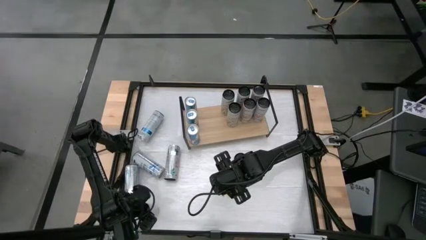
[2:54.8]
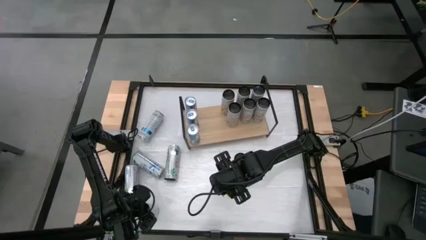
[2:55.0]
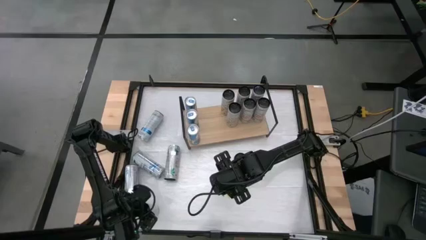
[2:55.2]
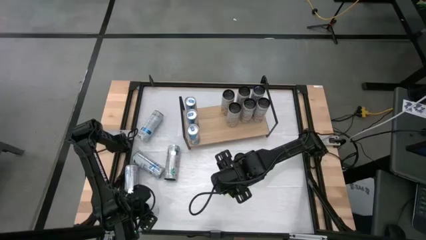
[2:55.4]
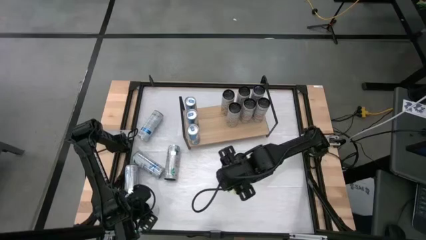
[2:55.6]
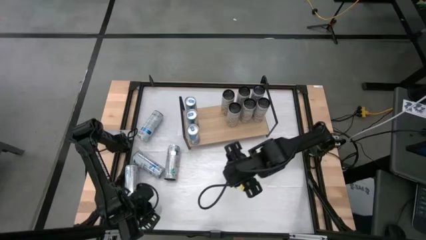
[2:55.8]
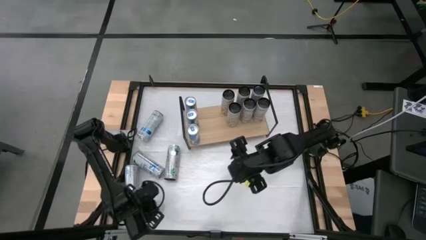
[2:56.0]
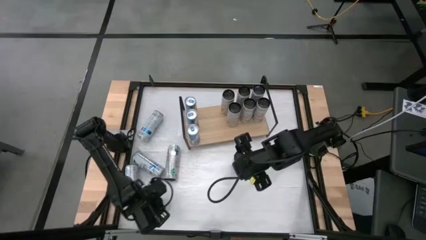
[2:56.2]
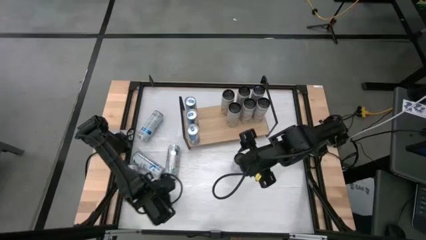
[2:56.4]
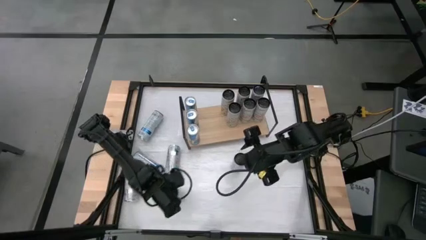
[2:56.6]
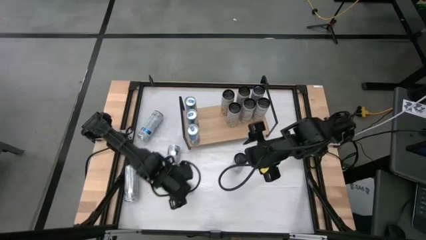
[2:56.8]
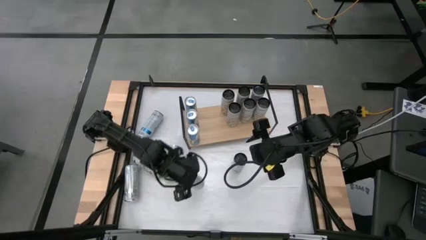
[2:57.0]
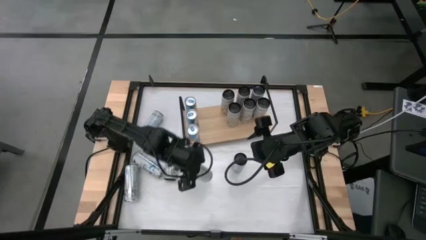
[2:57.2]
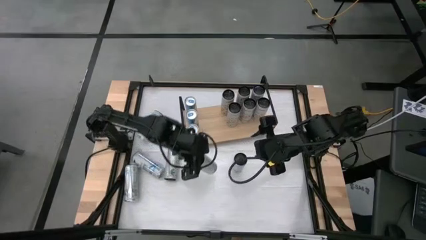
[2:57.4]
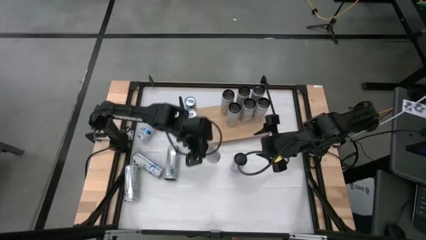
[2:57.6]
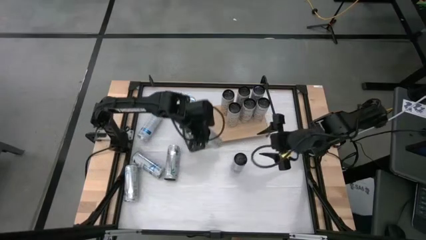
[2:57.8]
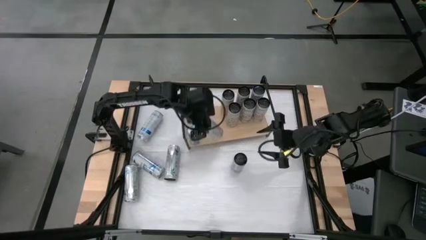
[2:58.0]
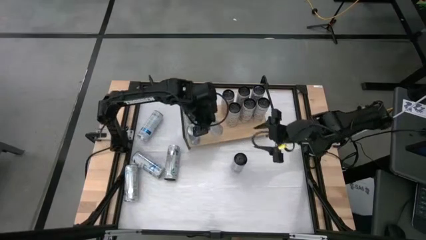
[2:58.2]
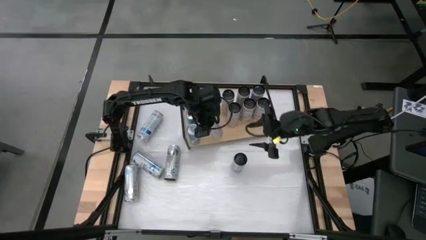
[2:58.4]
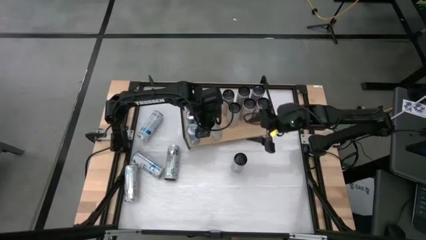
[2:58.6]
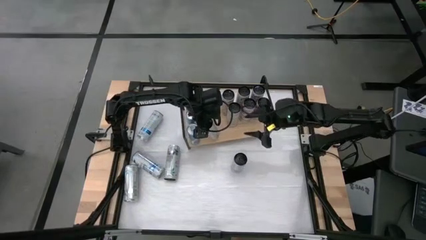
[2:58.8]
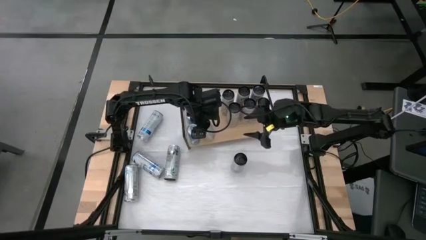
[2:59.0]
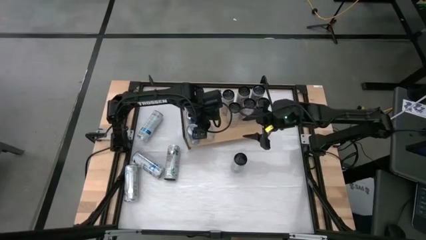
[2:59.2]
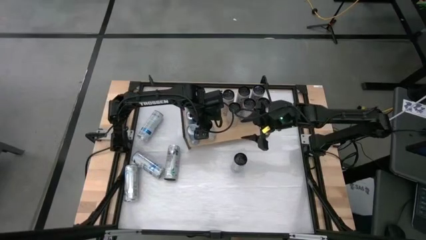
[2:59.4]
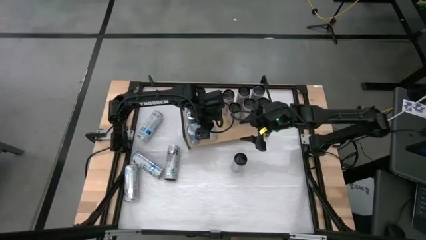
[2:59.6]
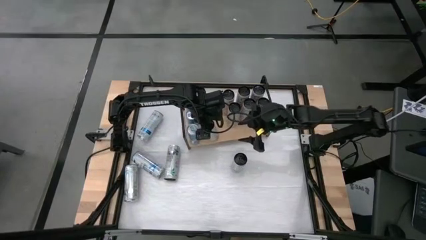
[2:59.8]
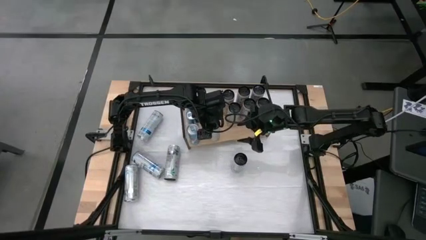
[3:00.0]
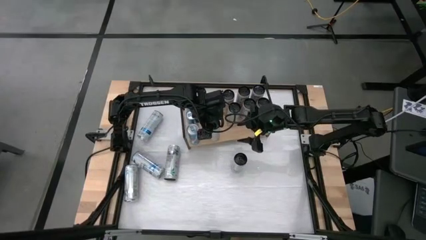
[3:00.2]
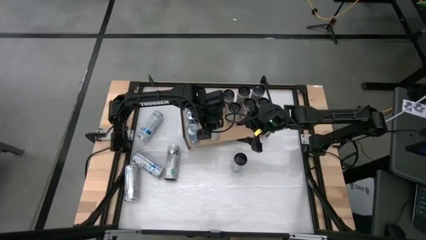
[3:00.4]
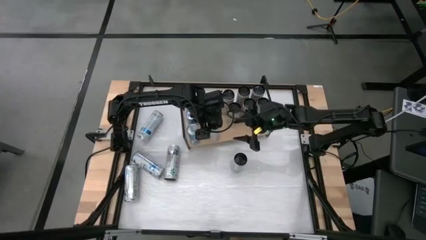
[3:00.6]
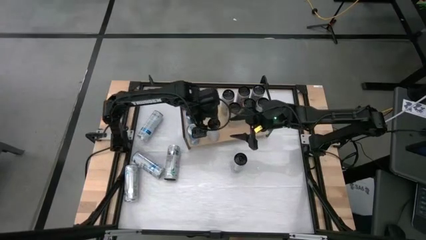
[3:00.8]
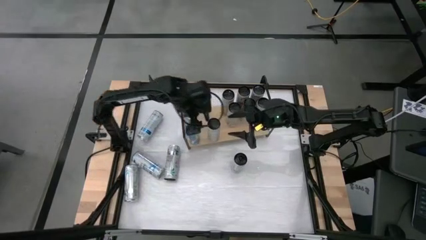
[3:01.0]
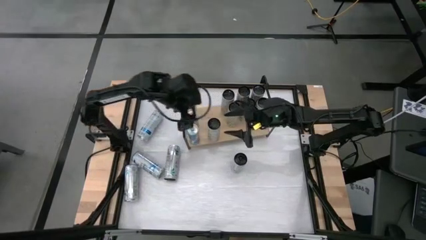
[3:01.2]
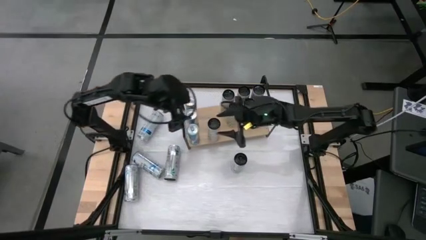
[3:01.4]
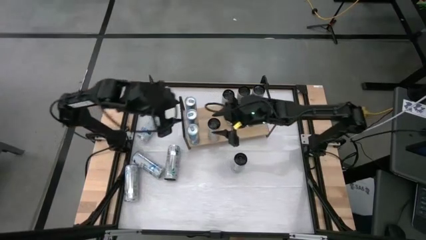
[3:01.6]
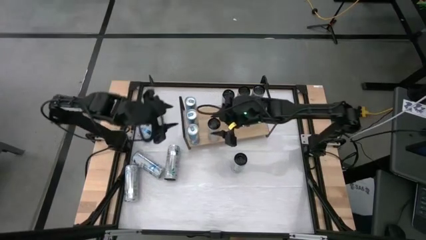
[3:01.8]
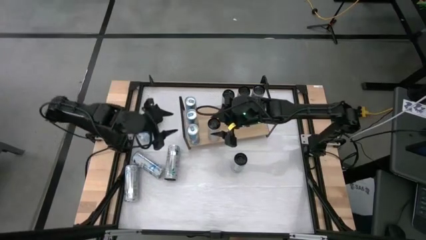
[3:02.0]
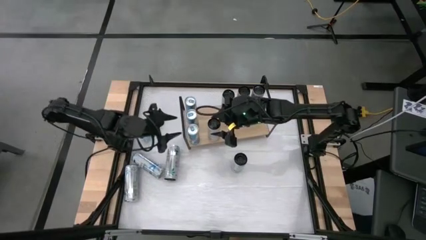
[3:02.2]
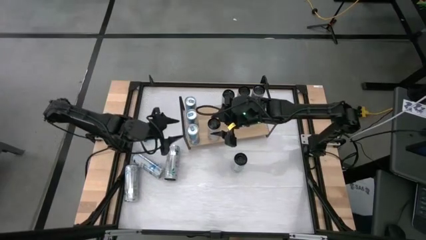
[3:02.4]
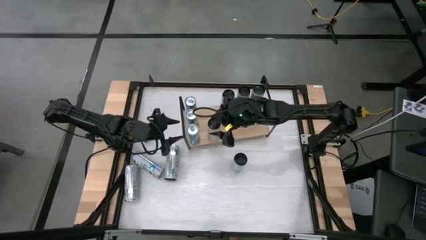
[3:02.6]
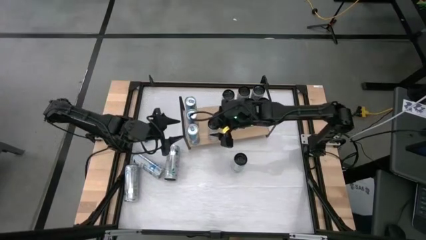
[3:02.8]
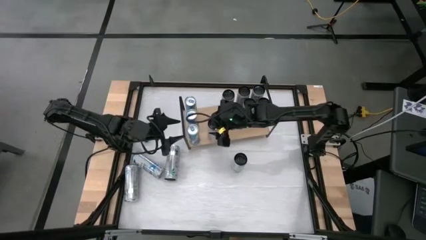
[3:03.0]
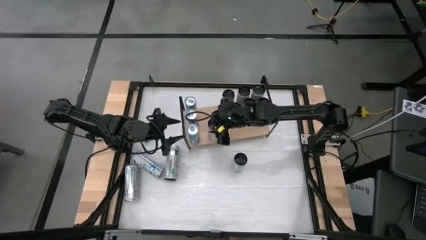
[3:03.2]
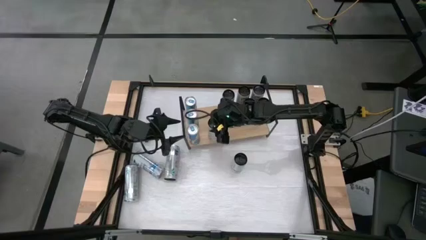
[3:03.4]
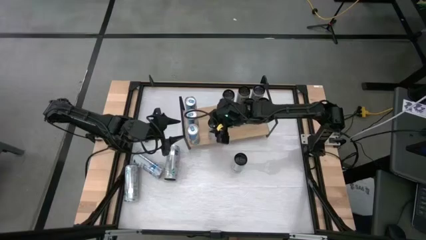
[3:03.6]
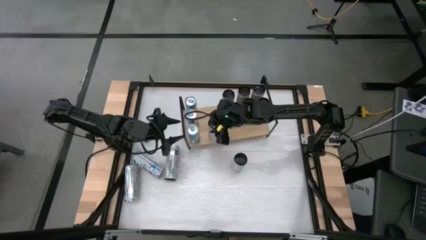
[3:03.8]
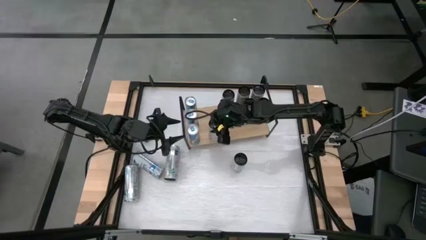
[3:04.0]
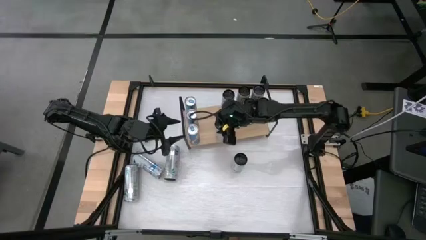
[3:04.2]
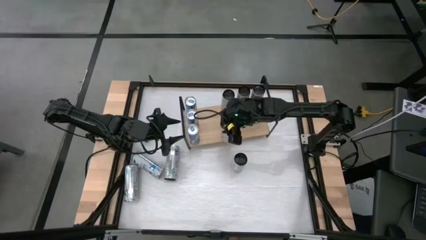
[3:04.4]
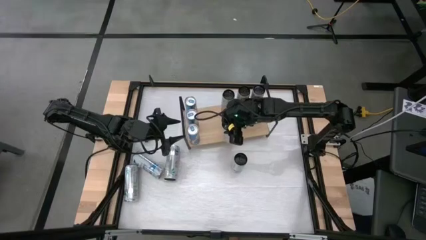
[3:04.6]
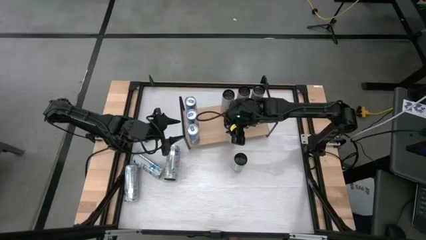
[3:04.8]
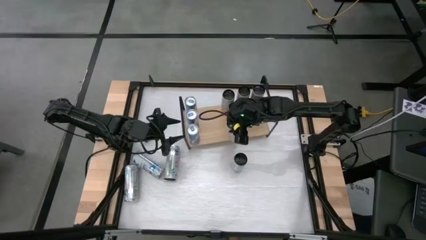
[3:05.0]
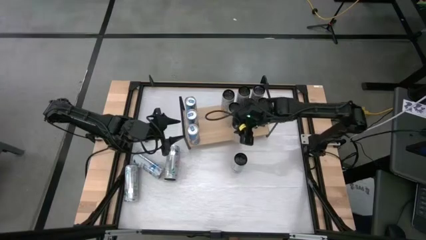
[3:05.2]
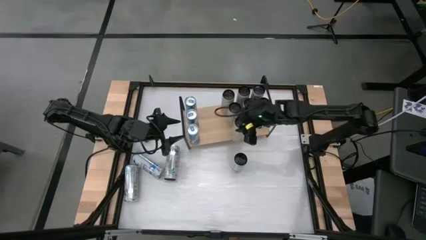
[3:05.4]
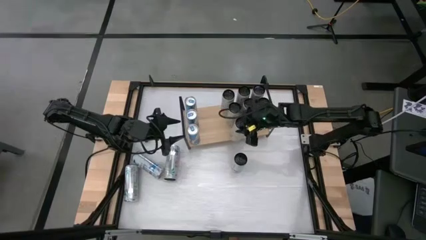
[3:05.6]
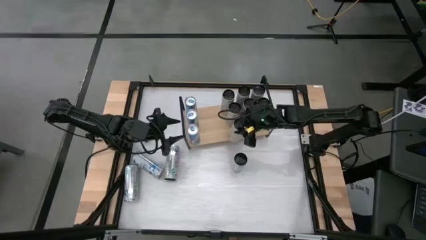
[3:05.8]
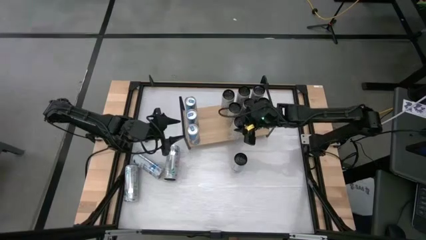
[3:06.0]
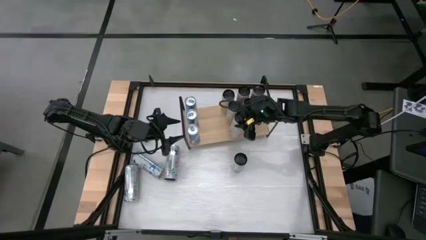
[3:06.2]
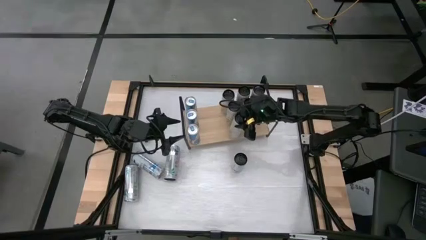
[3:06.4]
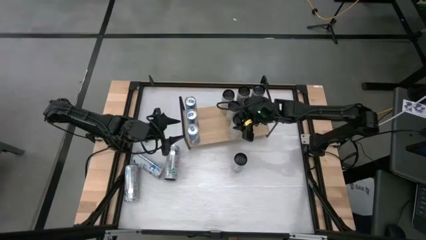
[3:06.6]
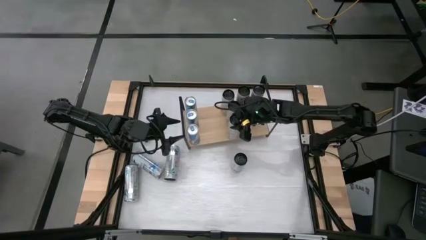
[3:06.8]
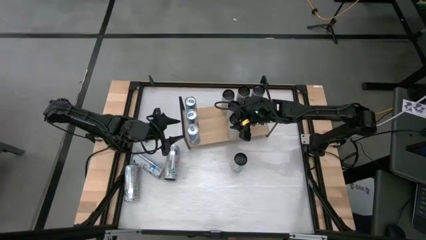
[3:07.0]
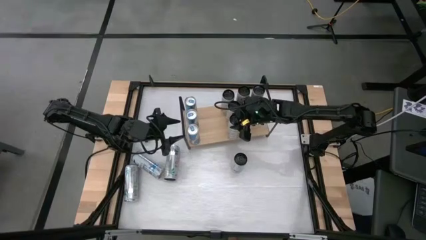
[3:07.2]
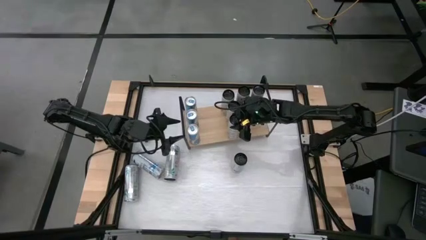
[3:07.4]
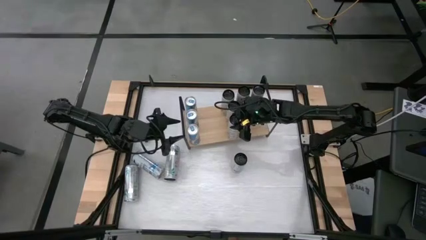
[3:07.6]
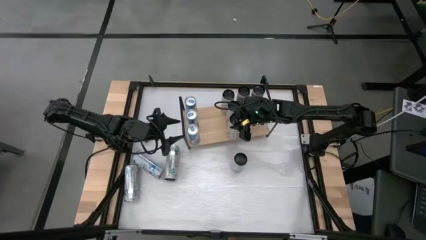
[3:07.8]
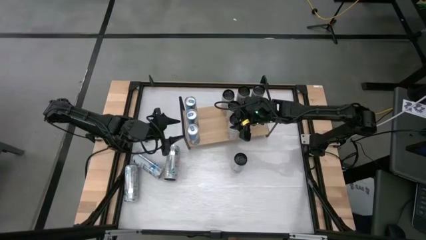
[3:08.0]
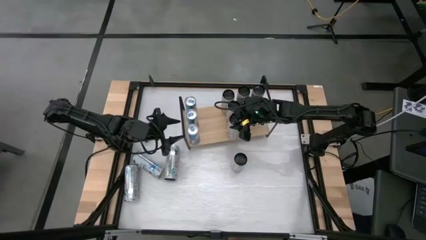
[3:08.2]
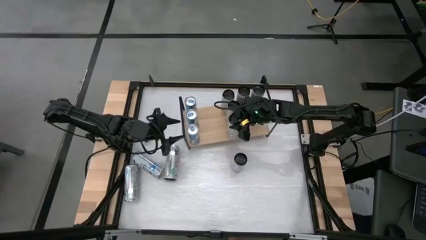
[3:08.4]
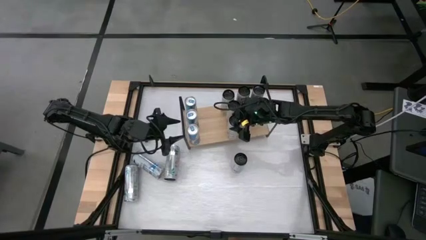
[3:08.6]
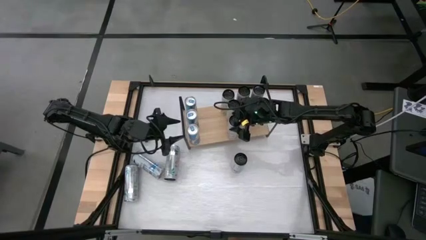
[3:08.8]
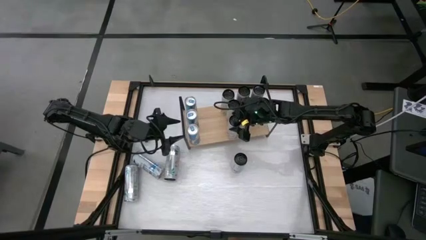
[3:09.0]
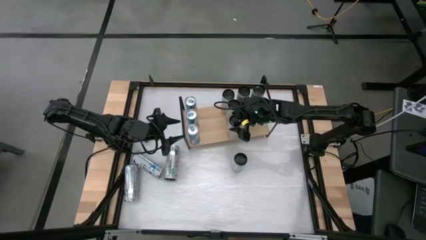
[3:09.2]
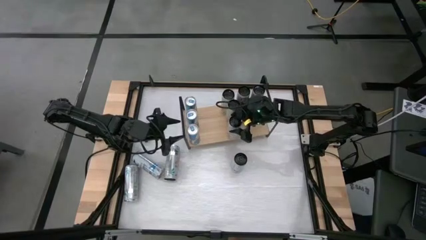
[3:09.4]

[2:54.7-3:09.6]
Task: Place canned beverage on shelf
Put the white-yellow soda can on the shelf aligned with the other white-yellow soda can

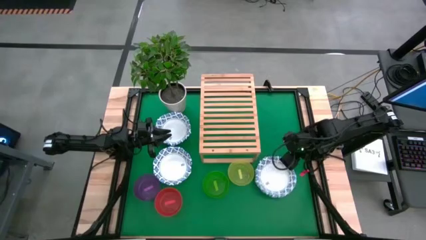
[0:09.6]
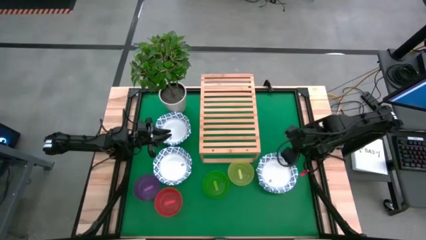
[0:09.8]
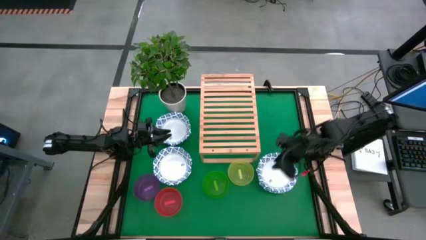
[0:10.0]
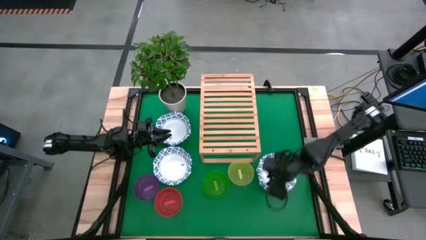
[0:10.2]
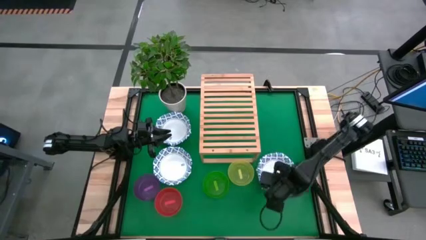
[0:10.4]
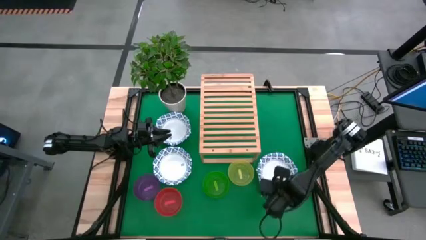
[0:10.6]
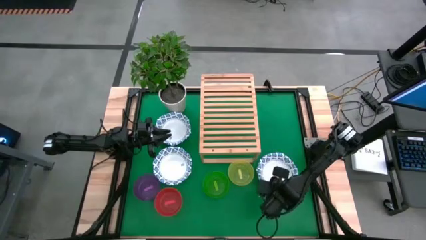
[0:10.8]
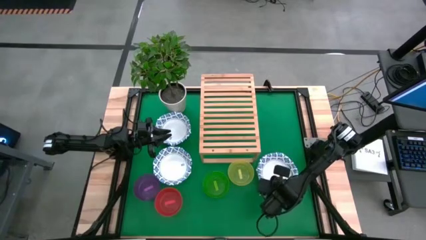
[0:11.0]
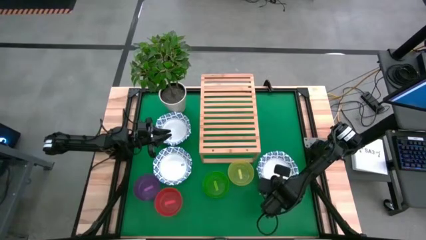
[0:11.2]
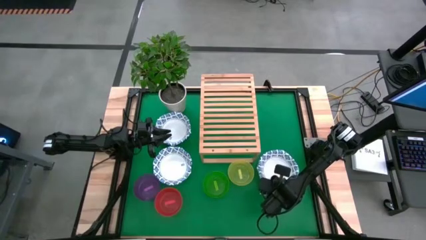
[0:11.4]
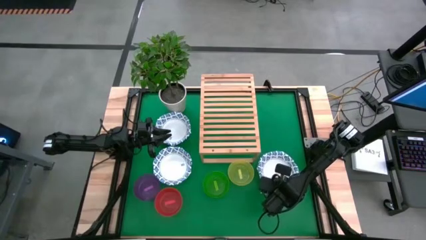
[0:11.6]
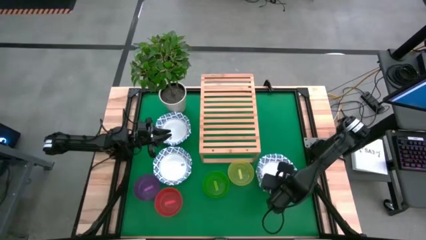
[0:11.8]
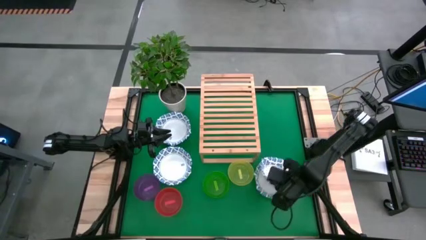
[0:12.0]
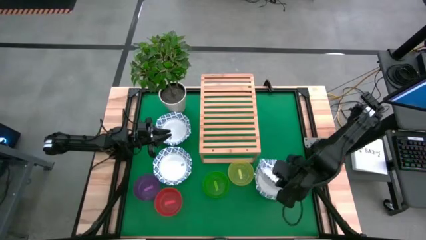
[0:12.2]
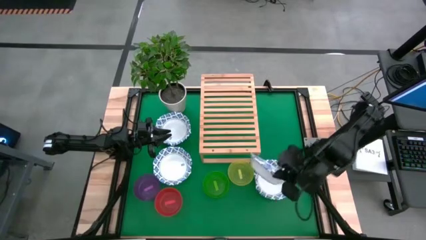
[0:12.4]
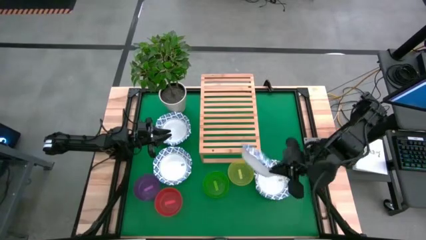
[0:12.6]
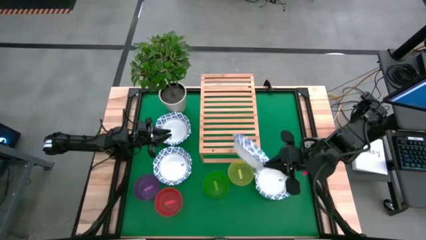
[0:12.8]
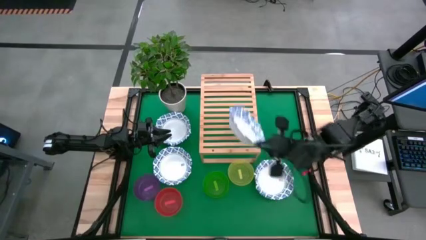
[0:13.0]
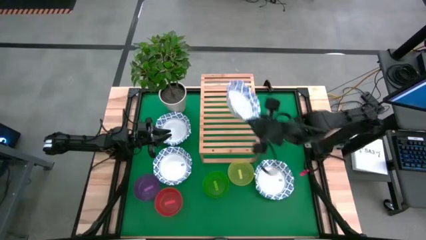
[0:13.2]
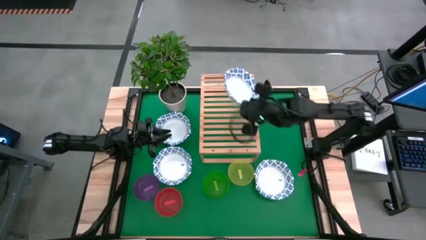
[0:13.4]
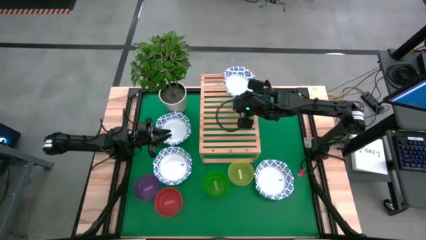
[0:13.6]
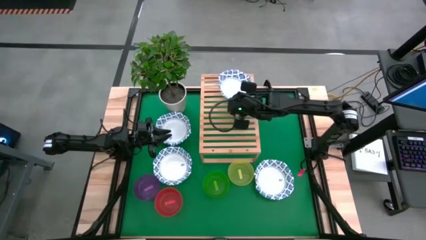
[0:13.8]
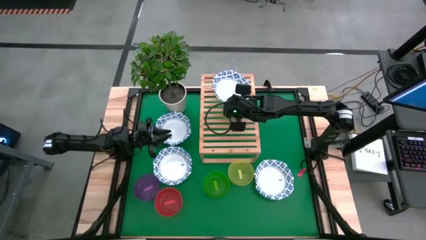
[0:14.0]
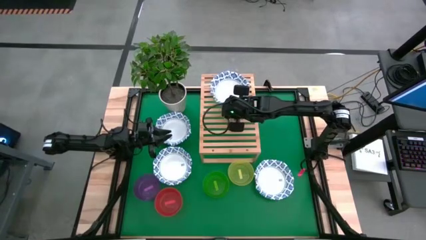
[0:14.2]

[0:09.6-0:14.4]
Task: Place and stack bowls onto a shelf
Put the white patterned bowl on the shelf
